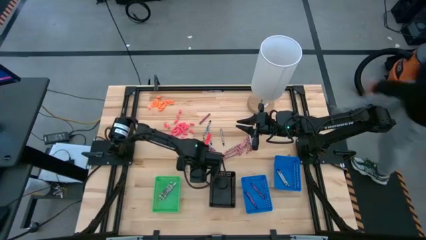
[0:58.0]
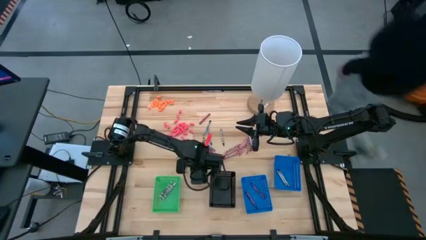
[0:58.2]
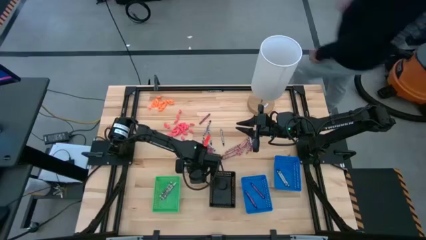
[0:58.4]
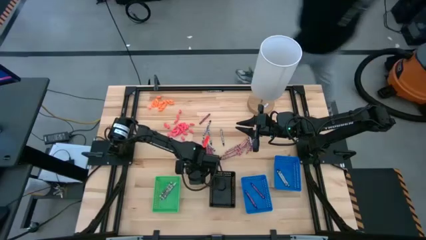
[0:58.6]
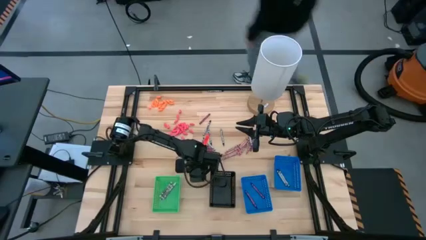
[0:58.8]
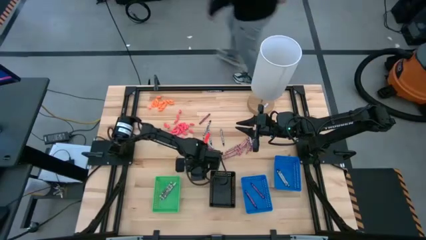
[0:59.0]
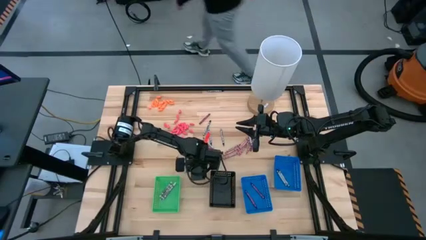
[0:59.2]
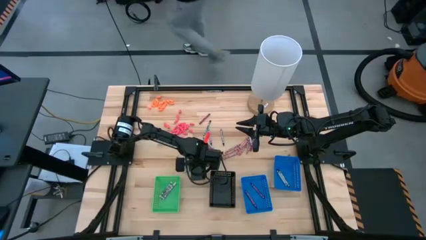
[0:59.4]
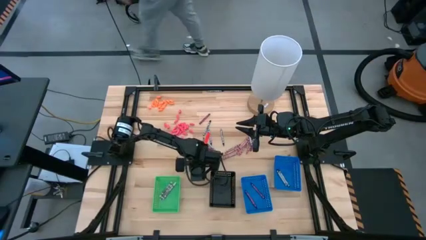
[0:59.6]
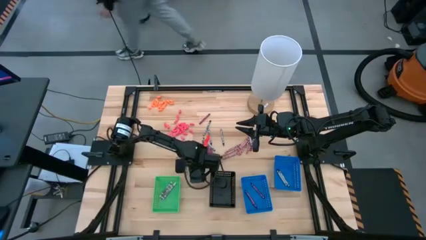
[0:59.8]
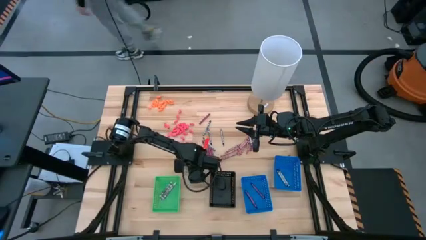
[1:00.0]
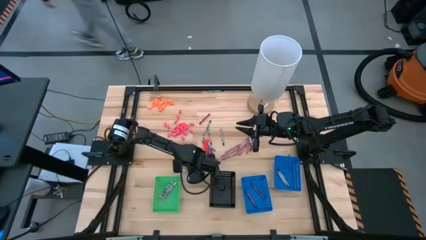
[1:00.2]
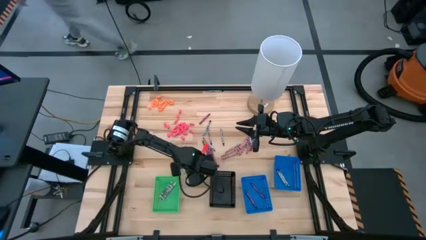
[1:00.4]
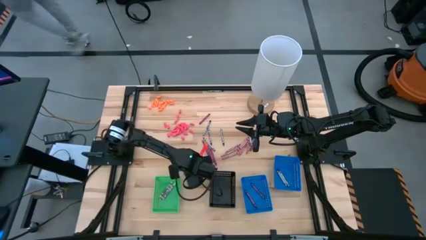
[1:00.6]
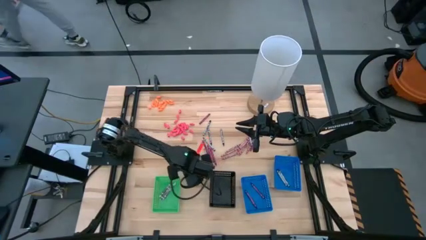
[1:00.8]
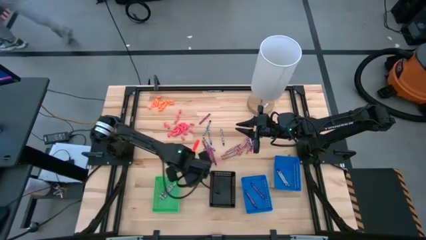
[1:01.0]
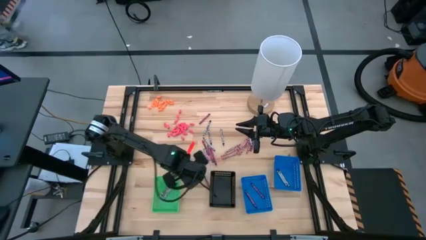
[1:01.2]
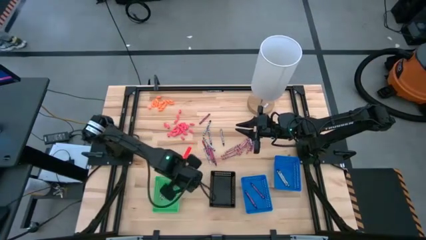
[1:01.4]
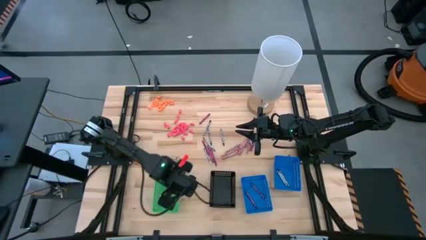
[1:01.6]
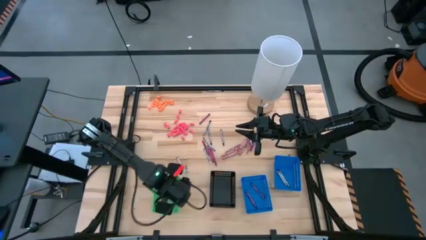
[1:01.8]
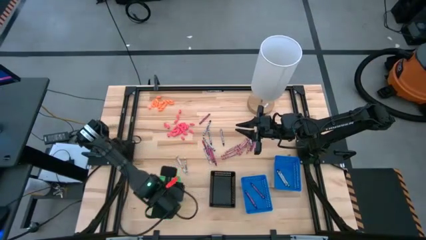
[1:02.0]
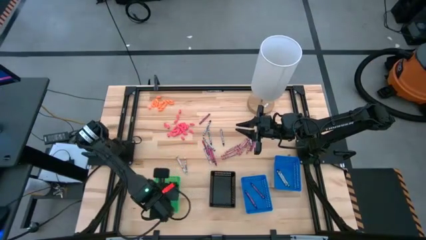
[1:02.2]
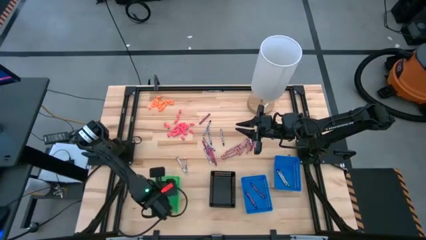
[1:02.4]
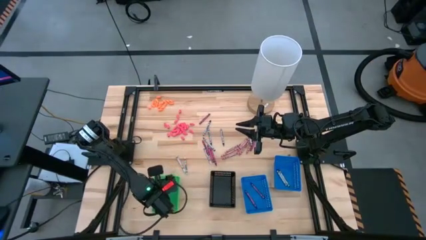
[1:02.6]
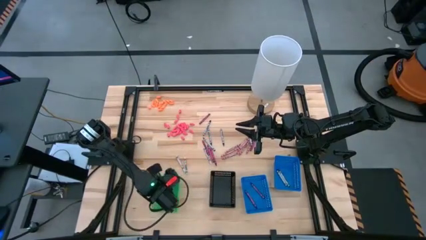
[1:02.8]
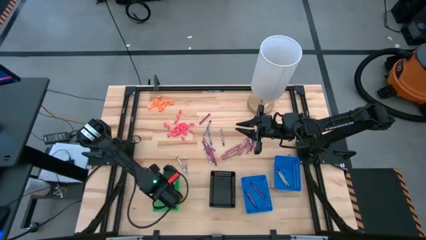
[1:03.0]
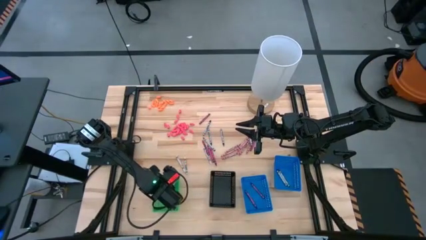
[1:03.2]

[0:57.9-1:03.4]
Task: Sort crayons
Put the white crayon into the green bin

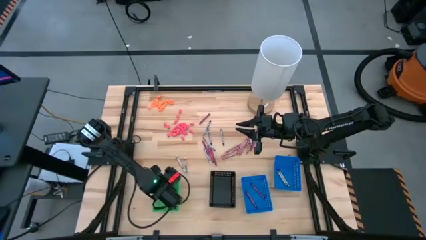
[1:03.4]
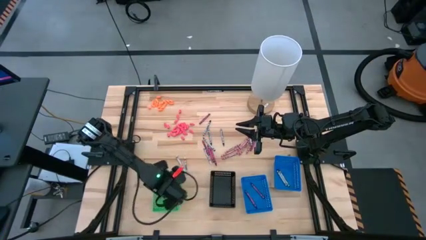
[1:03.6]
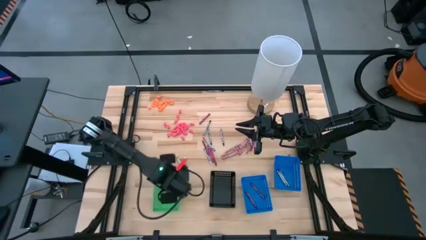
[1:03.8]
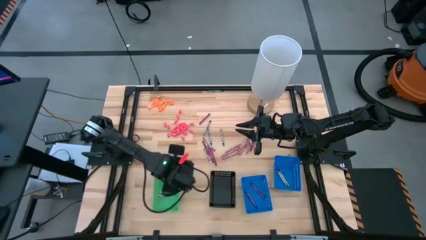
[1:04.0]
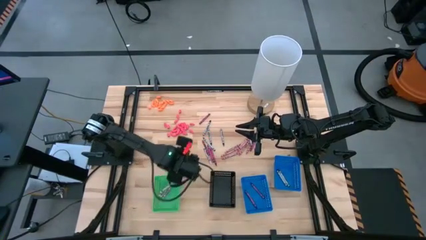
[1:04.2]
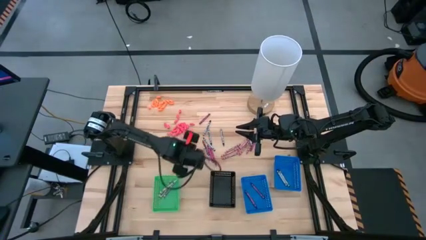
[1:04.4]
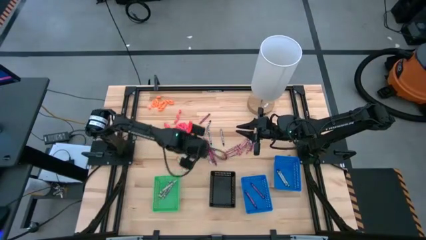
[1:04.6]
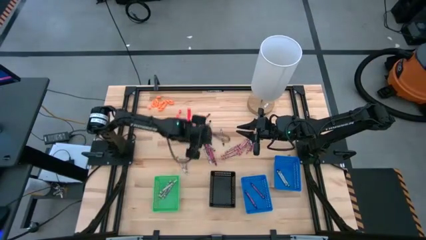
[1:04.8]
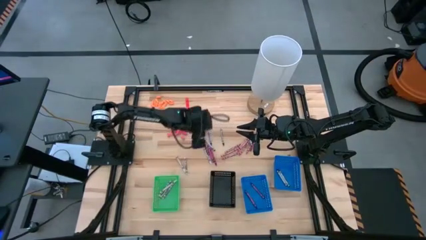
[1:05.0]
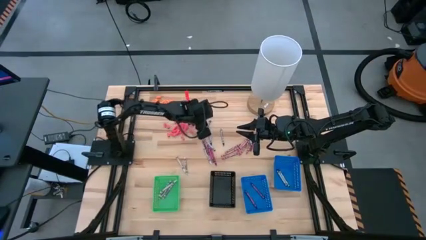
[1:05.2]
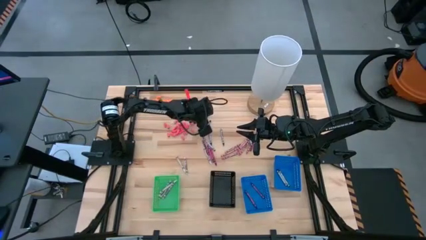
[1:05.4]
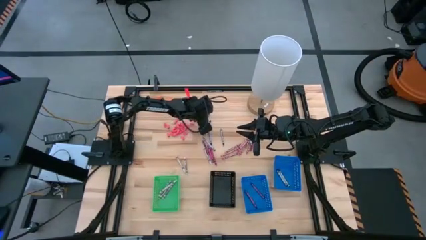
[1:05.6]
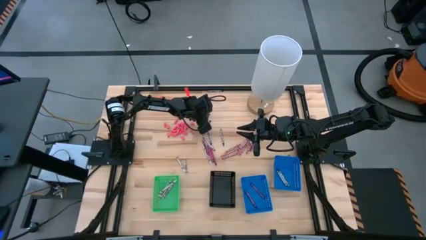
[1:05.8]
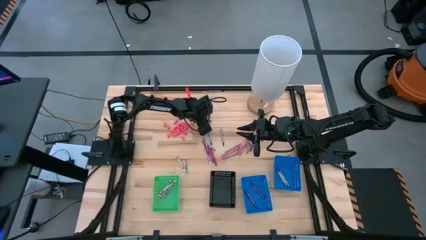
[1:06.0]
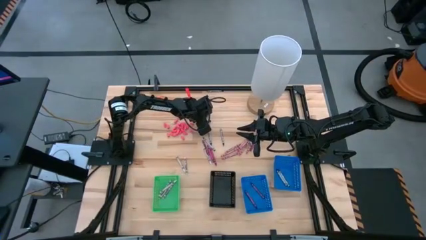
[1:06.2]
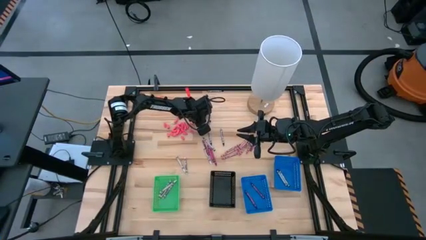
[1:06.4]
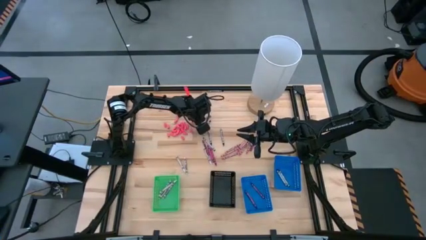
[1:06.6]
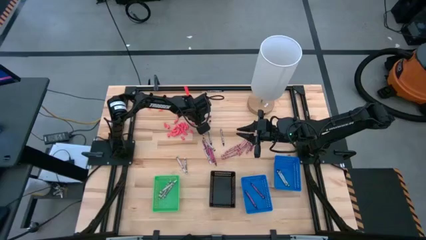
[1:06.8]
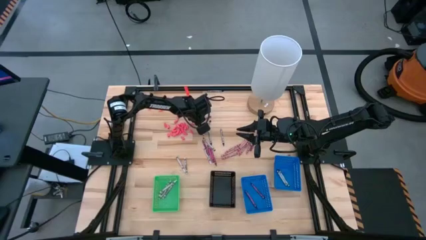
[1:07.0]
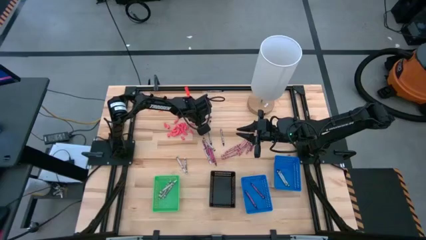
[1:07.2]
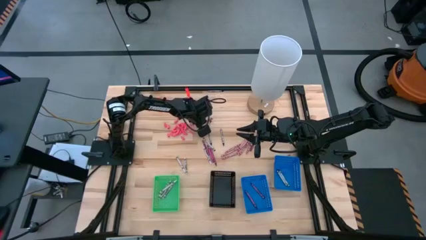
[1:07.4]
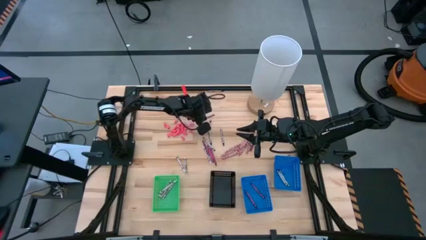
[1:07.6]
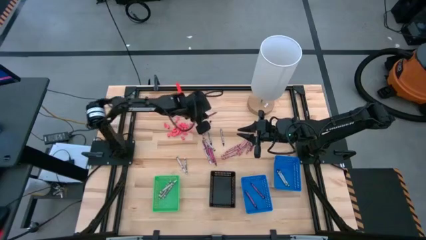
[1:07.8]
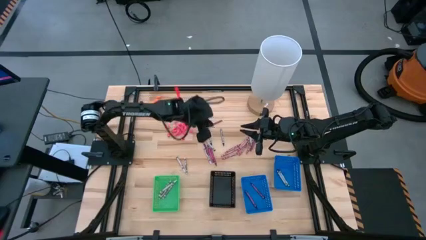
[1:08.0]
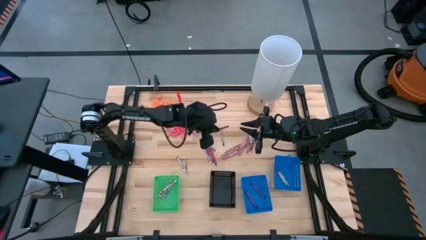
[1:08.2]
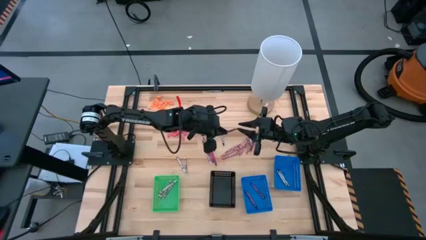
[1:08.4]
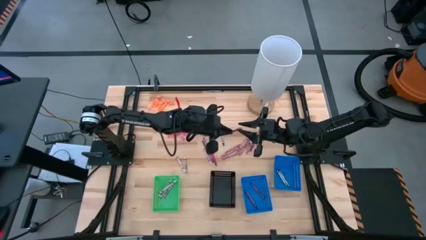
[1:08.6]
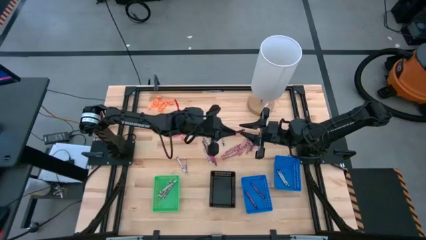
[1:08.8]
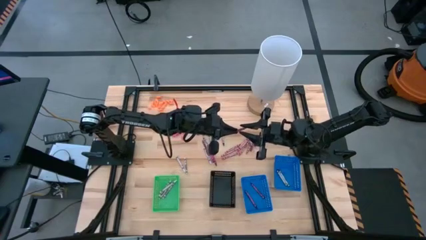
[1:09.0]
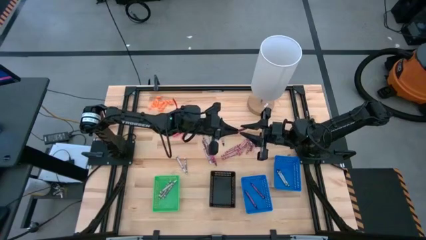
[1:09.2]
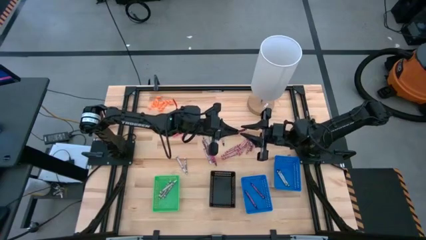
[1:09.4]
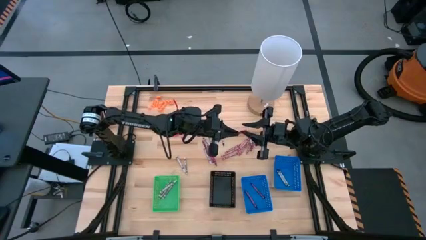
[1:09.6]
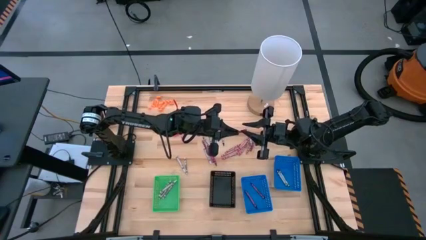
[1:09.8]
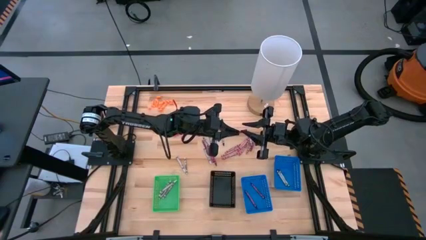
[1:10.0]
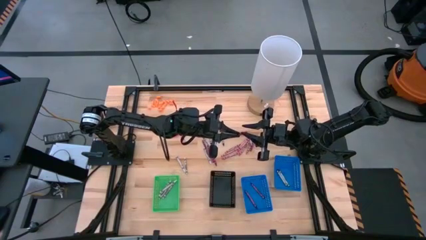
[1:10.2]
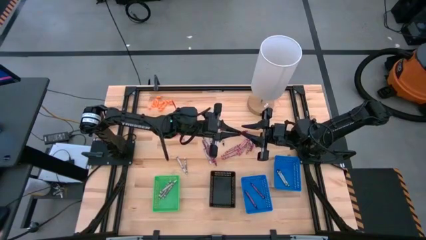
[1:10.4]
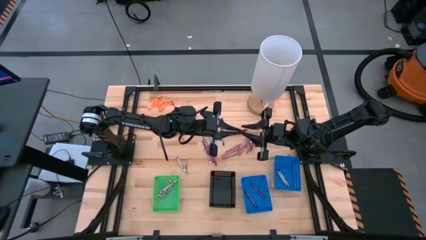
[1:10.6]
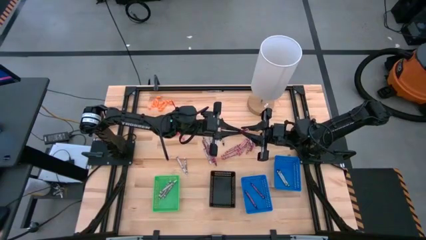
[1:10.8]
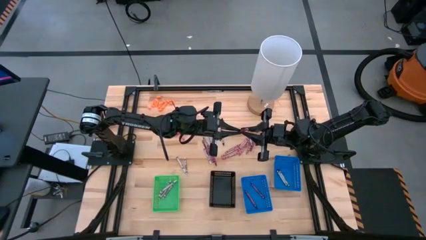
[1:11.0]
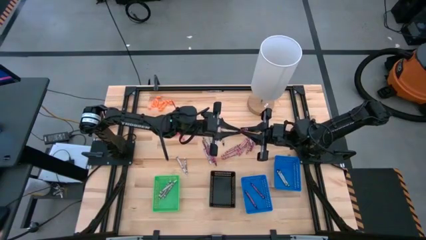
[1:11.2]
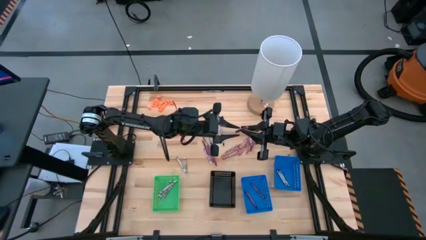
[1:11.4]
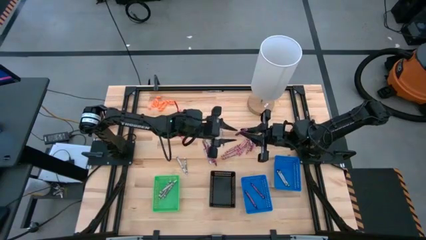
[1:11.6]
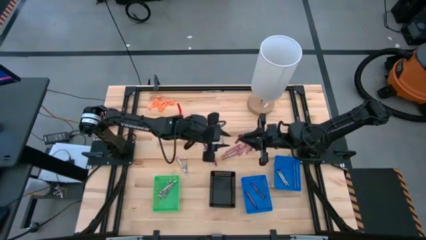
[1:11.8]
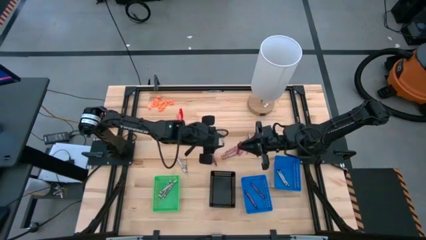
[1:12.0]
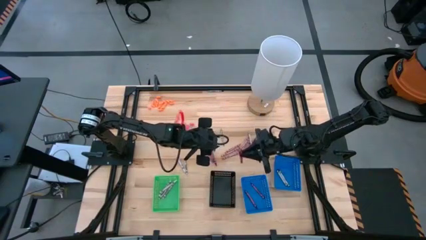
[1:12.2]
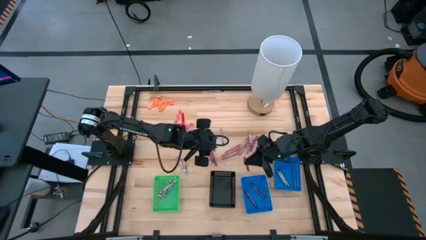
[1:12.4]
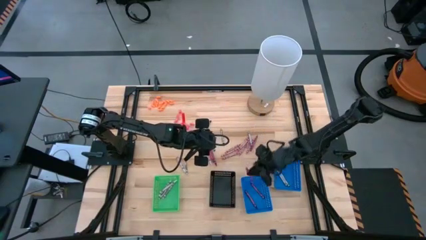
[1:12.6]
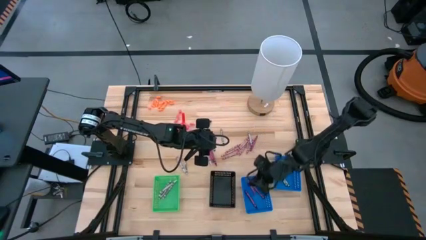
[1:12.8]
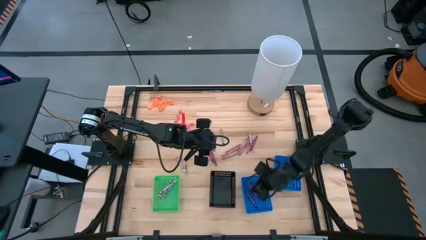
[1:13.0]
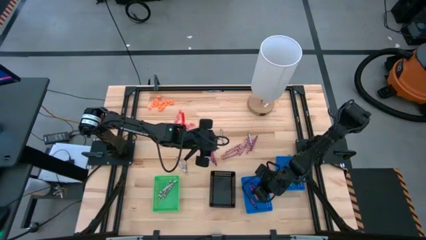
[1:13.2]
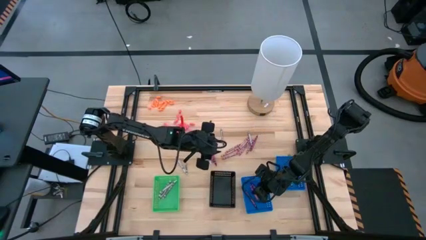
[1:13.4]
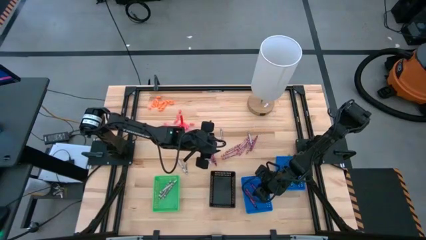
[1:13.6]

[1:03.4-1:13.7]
Put the red crayon into the left blue bin
